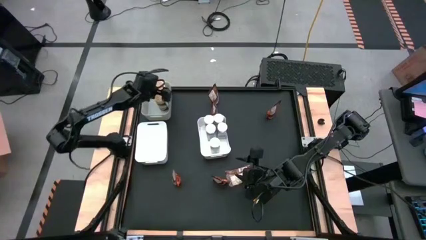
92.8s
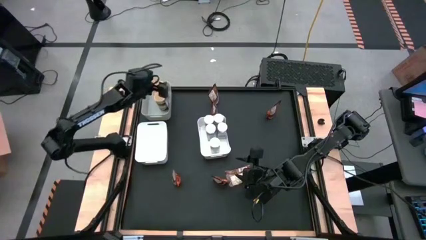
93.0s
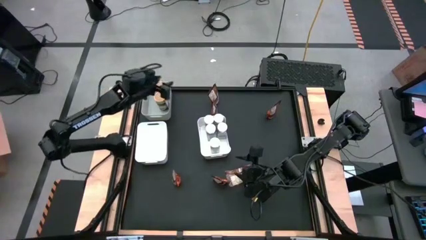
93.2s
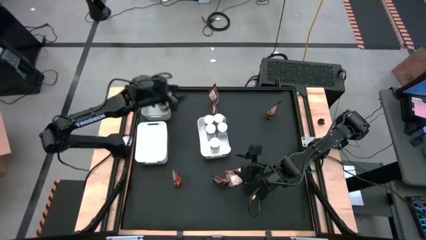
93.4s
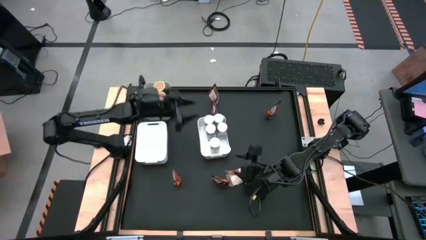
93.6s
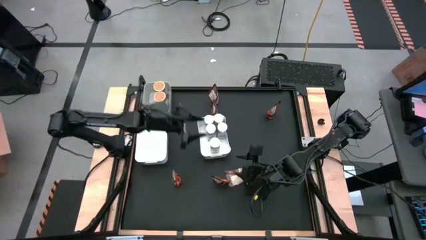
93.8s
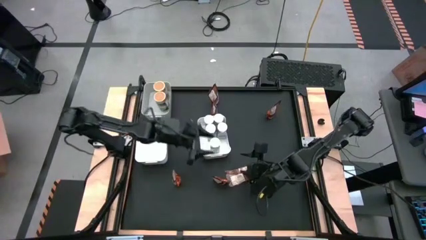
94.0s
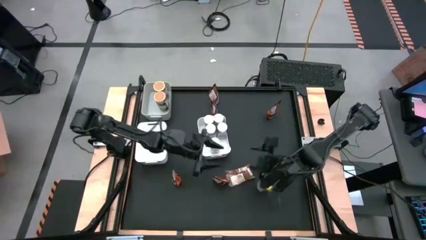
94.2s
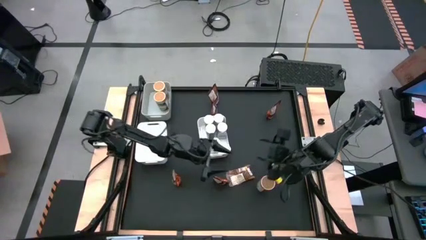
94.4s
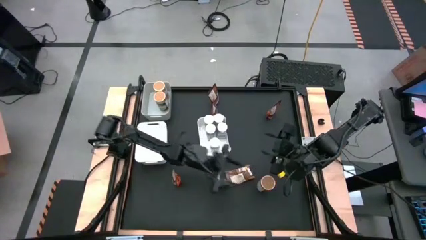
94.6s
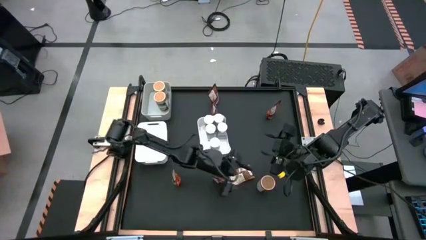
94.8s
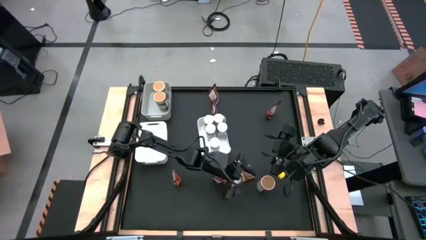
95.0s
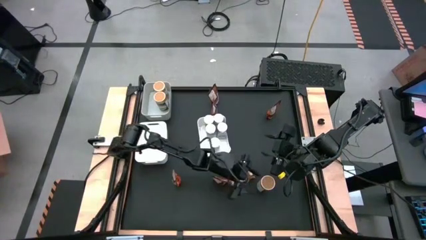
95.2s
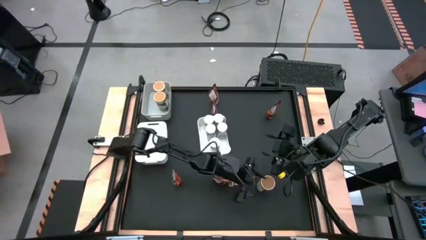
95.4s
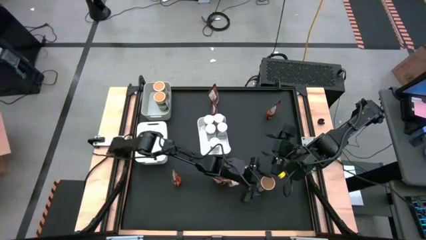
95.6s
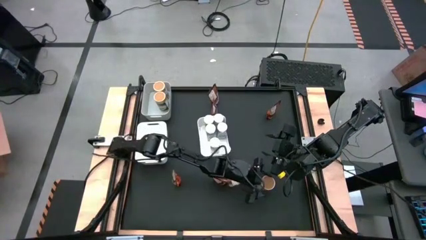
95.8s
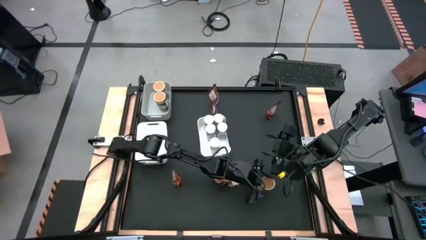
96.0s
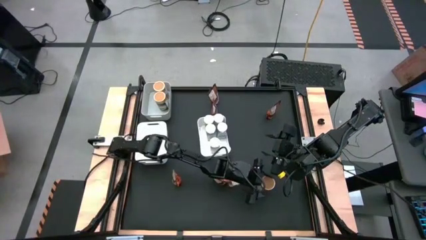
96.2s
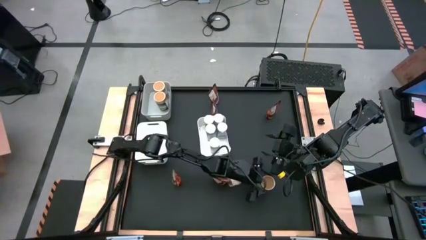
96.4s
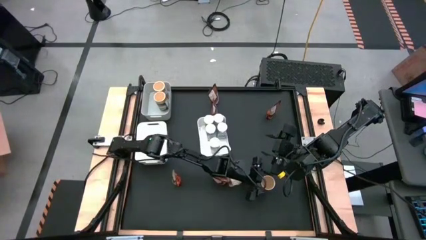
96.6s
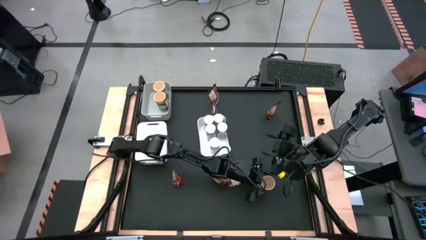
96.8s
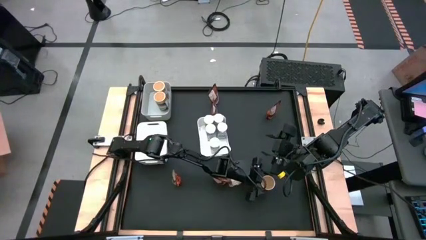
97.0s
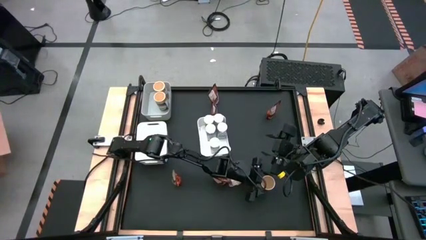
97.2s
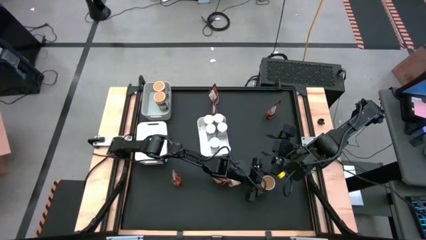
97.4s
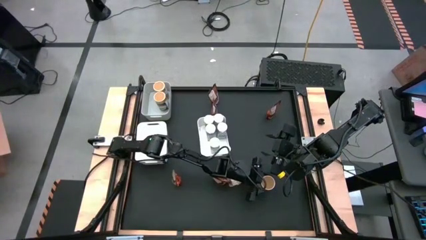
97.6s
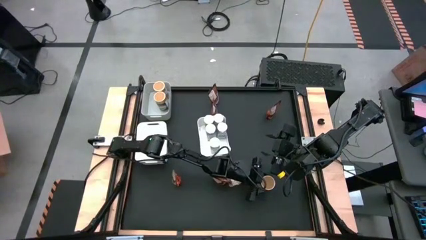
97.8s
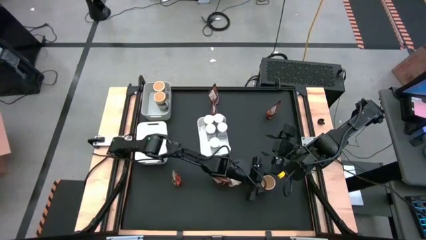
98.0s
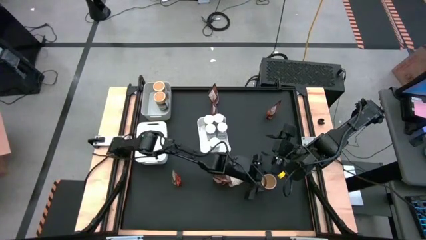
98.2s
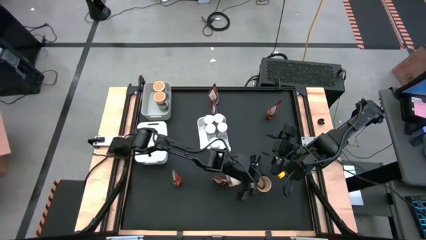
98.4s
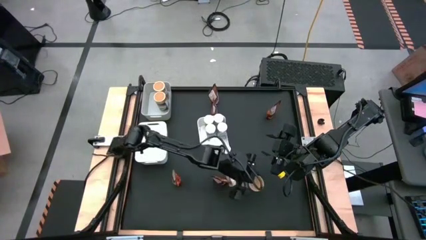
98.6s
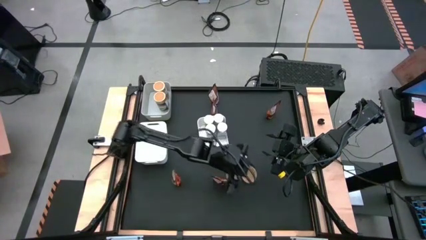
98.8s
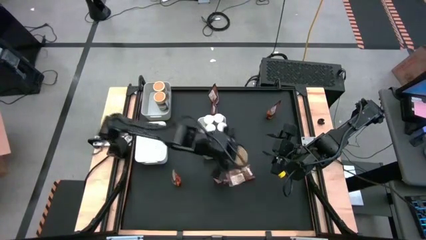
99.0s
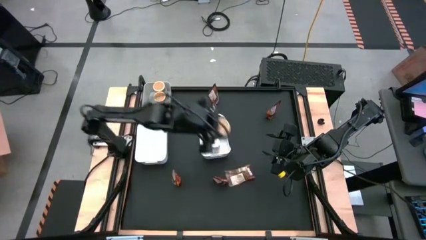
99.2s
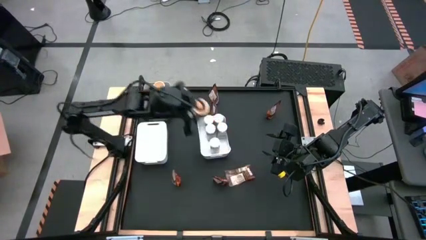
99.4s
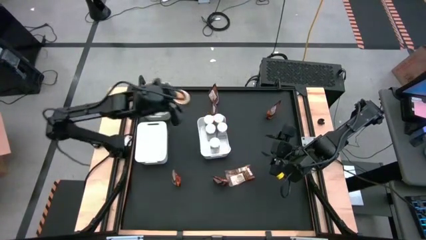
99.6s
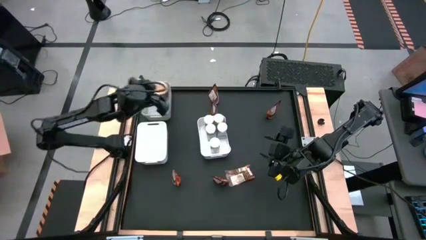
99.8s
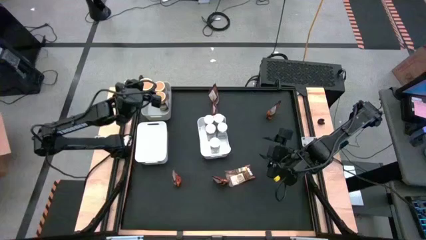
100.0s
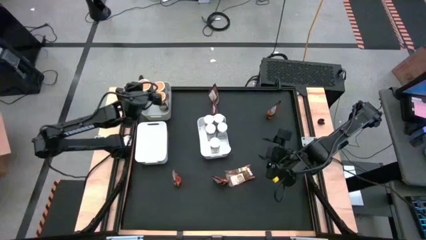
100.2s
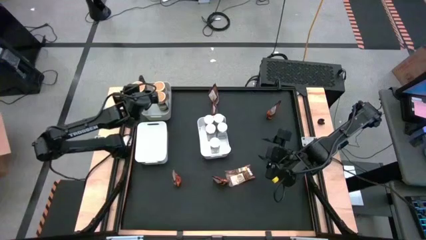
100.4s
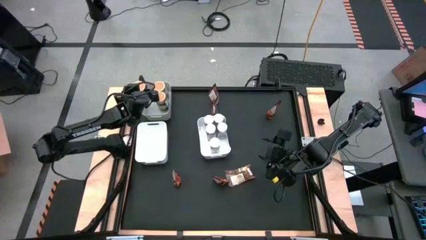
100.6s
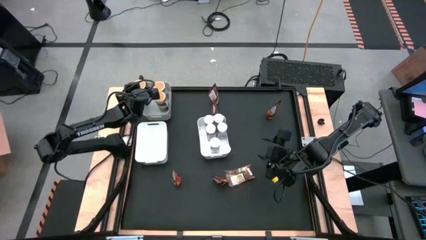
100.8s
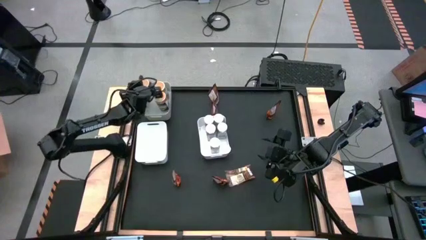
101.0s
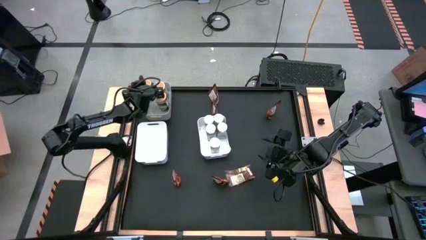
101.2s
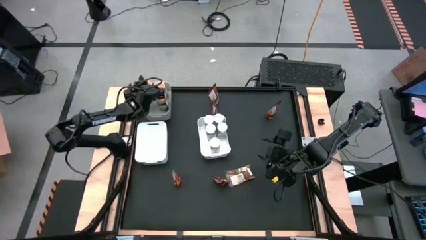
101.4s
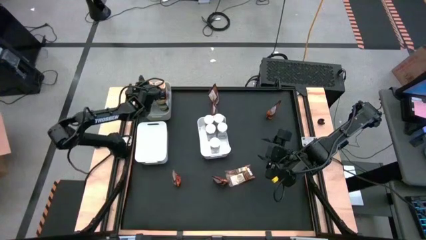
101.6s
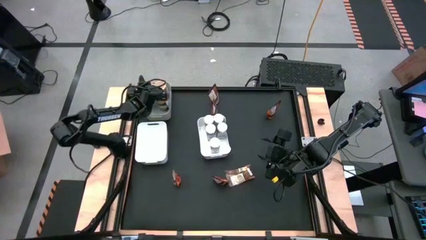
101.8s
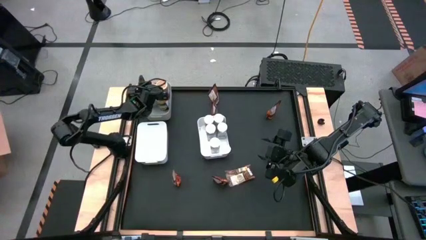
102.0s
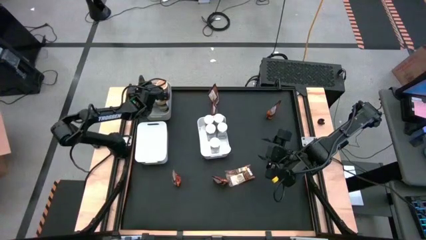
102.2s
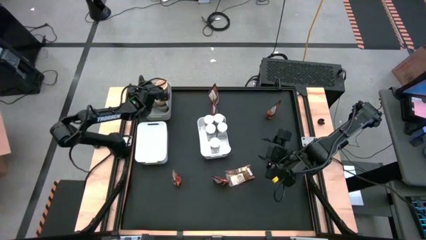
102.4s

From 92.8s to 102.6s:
Task: Sort spices by type
Put the gold seasoning bottle into the gray bin

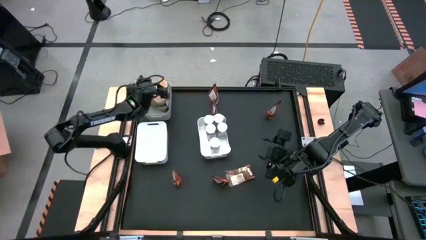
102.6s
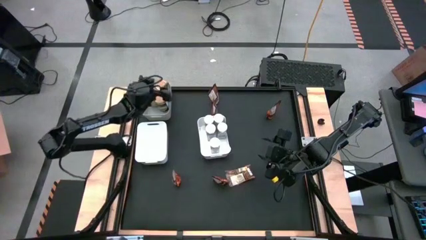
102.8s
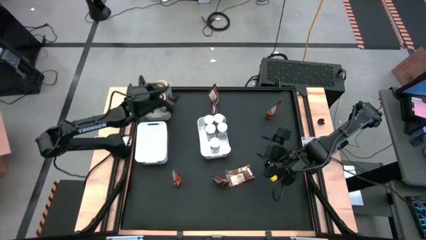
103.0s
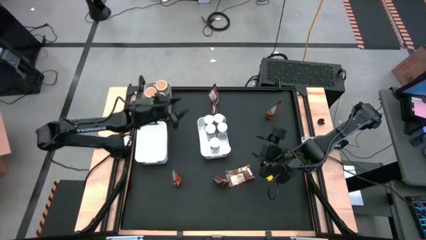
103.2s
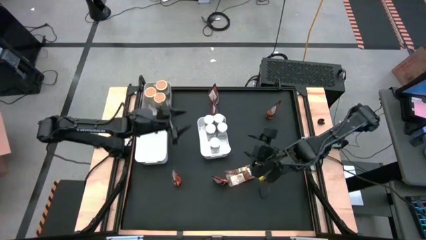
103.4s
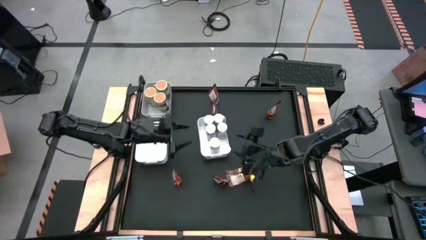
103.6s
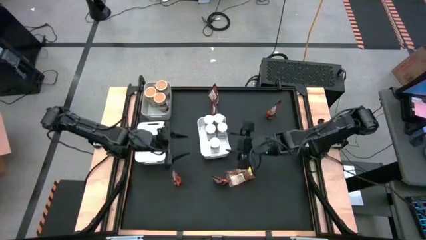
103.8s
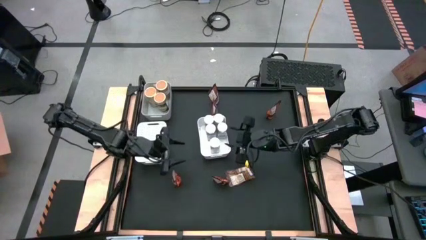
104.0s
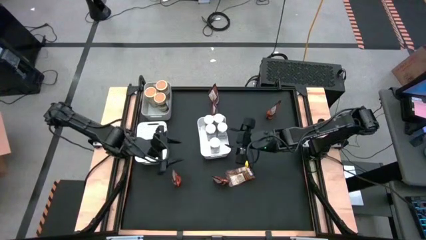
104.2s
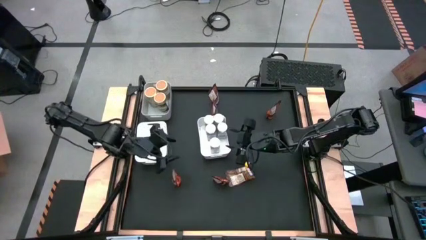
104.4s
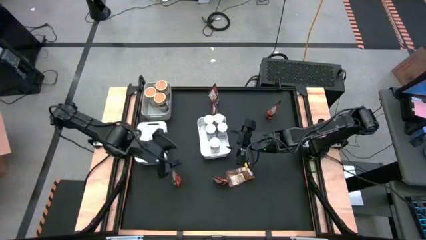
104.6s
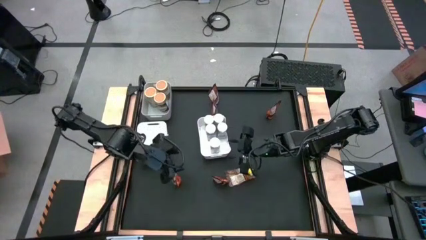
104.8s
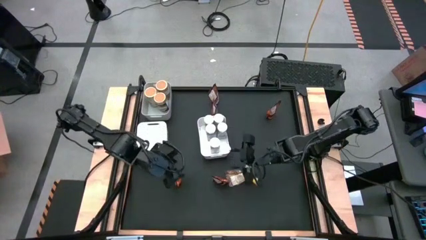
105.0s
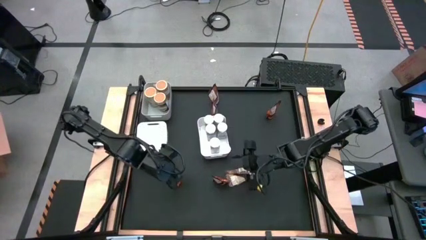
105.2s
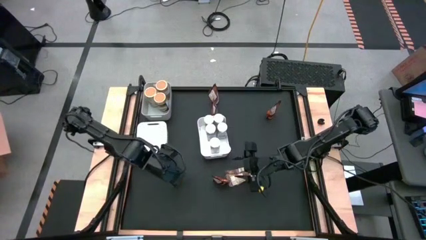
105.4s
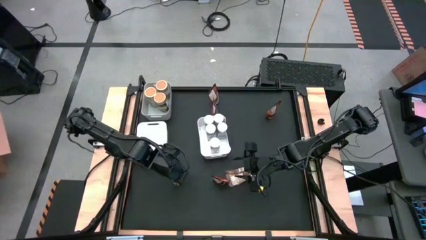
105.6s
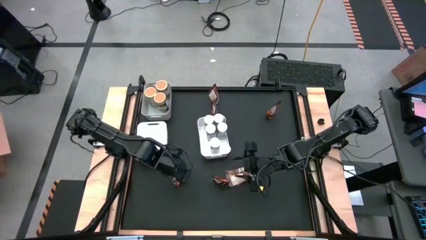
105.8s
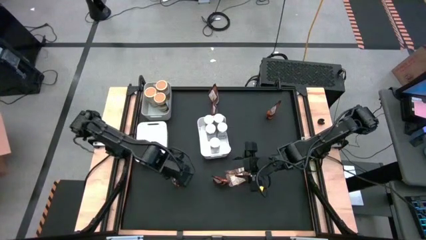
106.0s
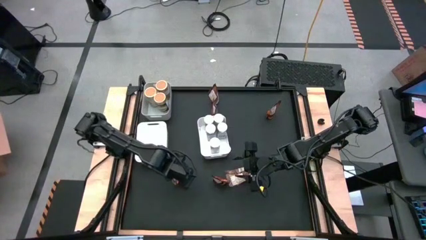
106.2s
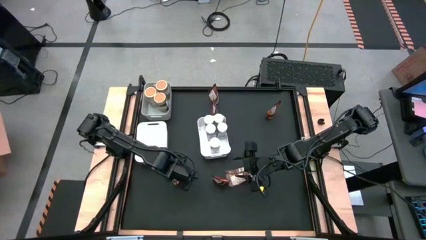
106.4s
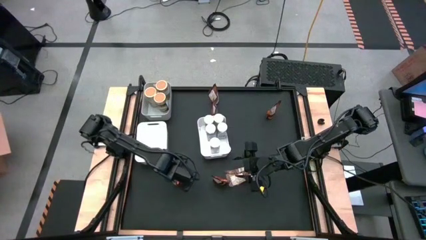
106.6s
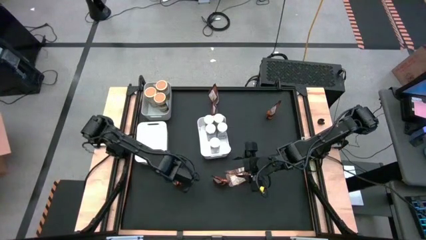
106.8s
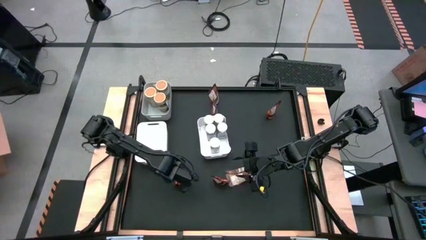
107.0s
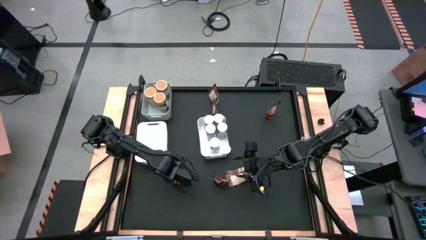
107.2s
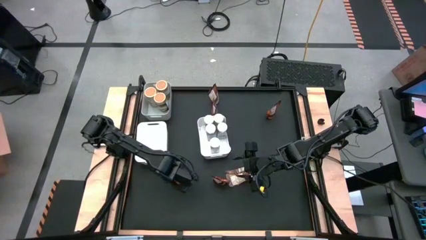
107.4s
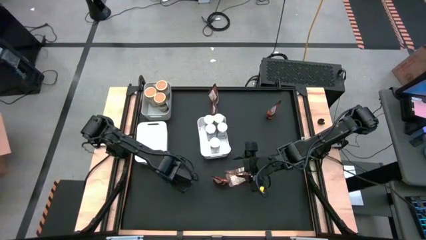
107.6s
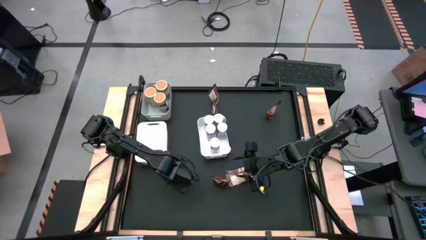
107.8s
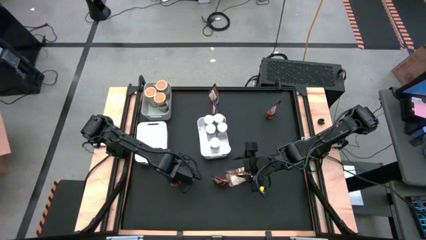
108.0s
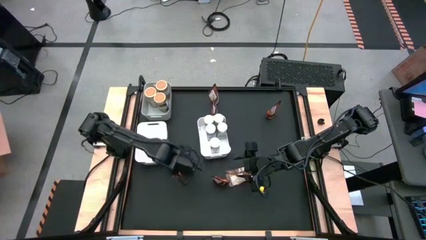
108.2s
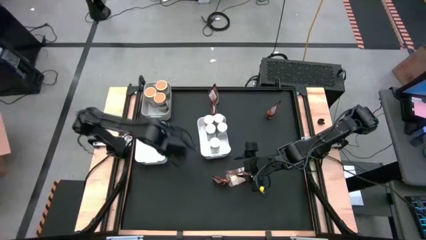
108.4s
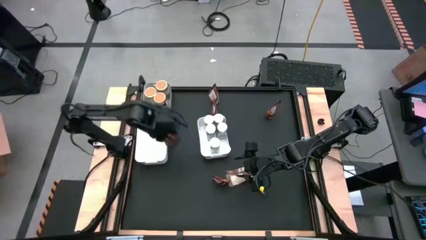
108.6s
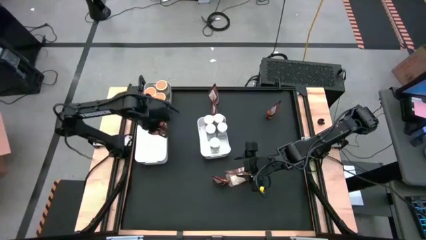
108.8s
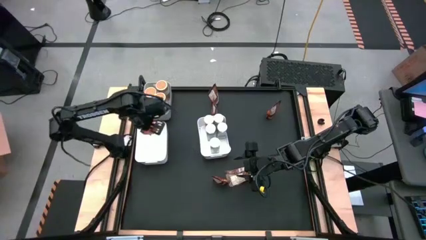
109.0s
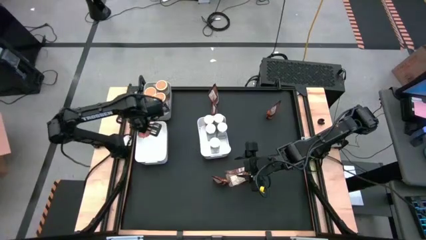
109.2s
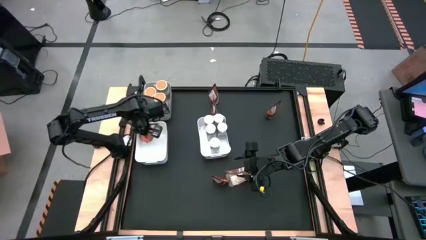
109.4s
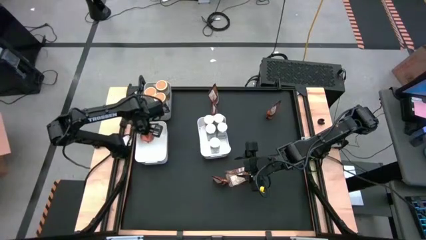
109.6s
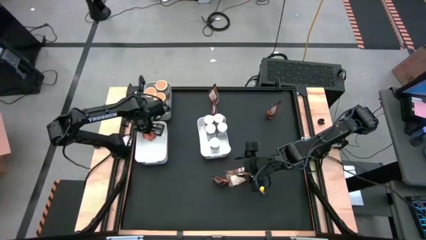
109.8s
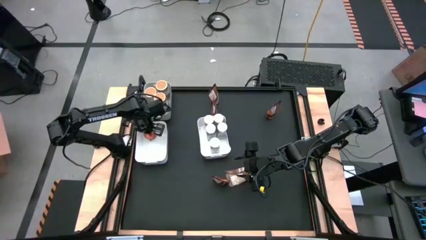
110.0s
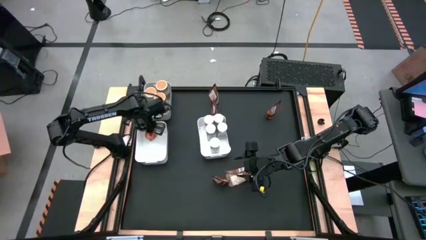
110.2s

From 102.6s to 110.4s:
Put the orange seasoning pack into the left white bin
